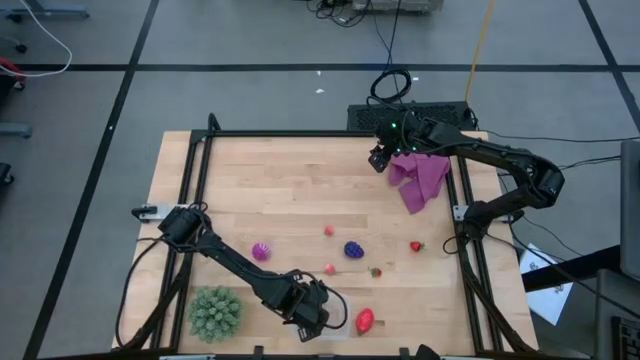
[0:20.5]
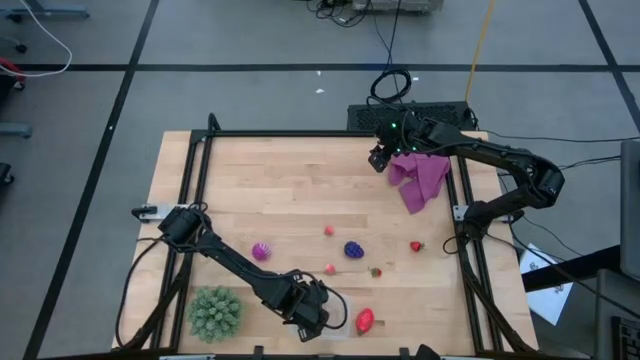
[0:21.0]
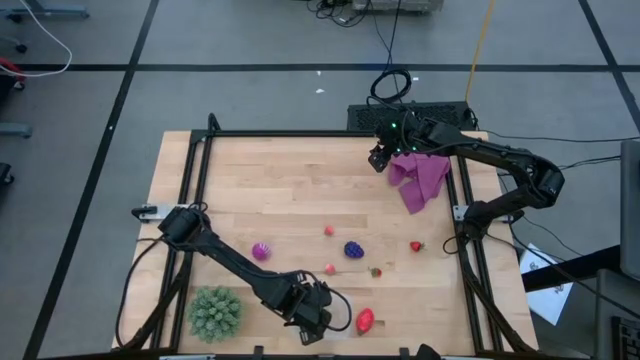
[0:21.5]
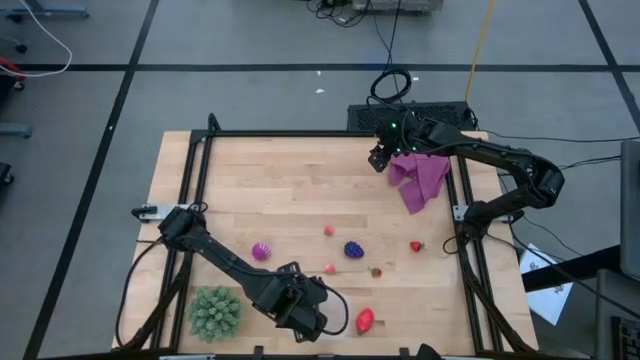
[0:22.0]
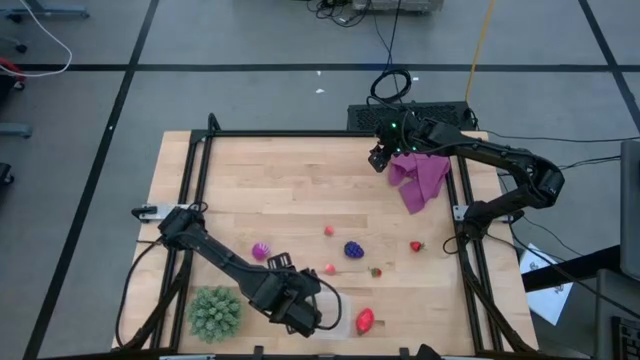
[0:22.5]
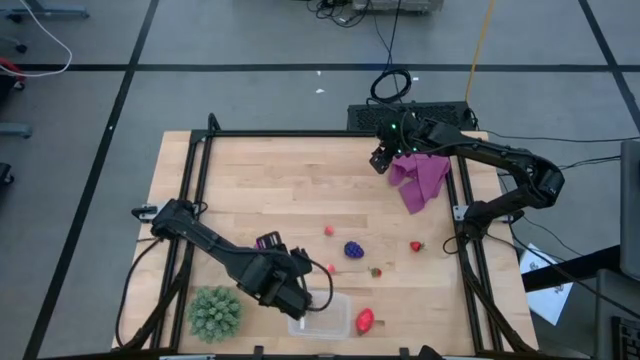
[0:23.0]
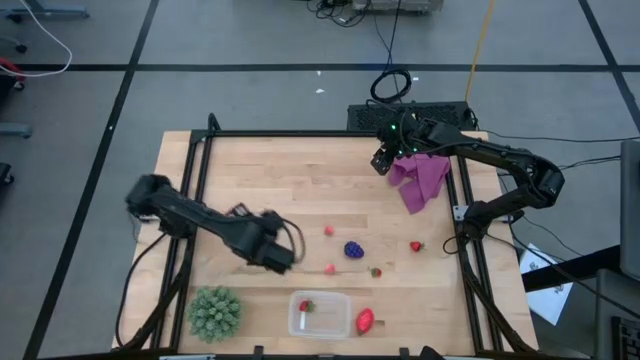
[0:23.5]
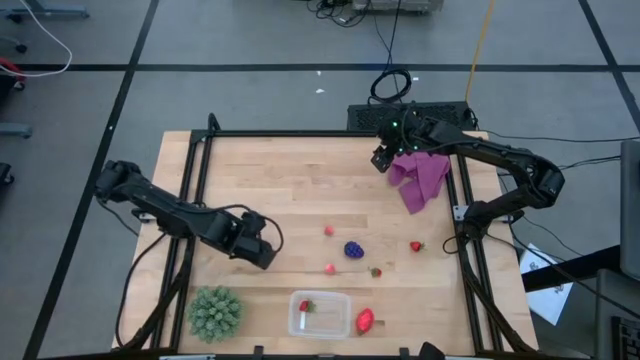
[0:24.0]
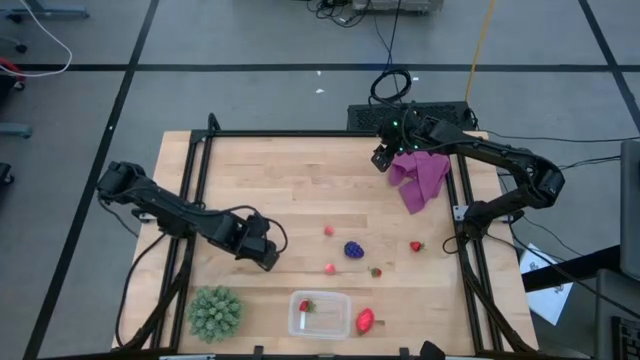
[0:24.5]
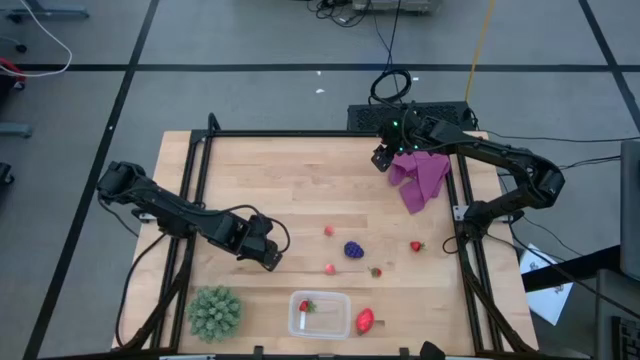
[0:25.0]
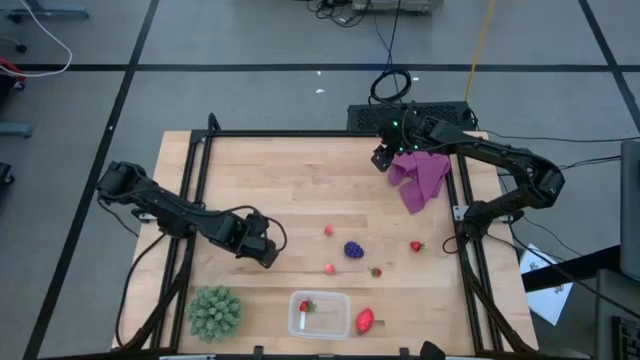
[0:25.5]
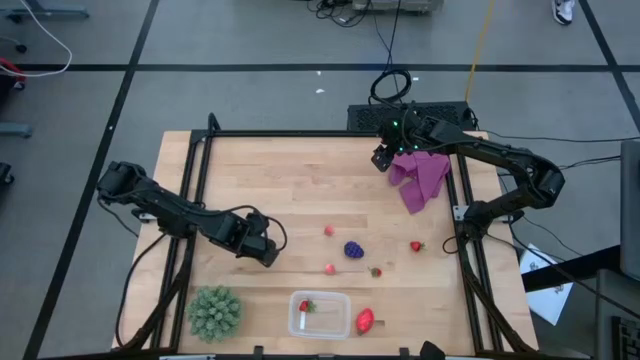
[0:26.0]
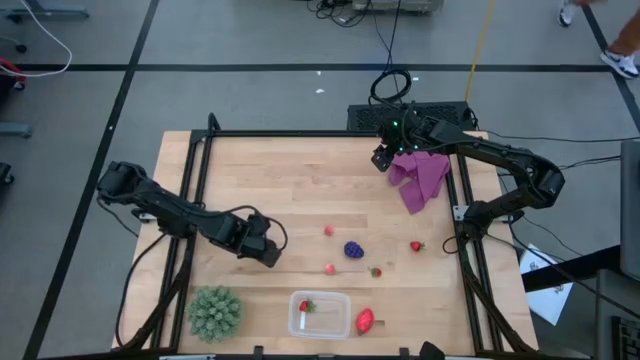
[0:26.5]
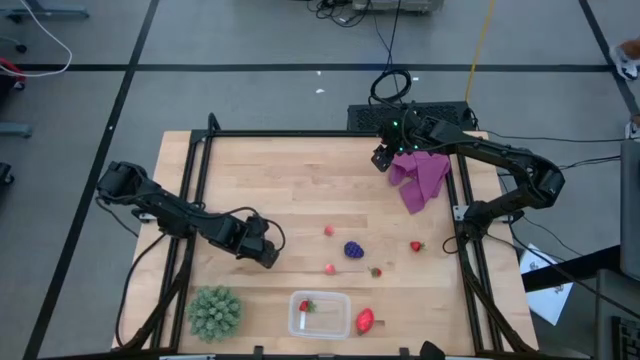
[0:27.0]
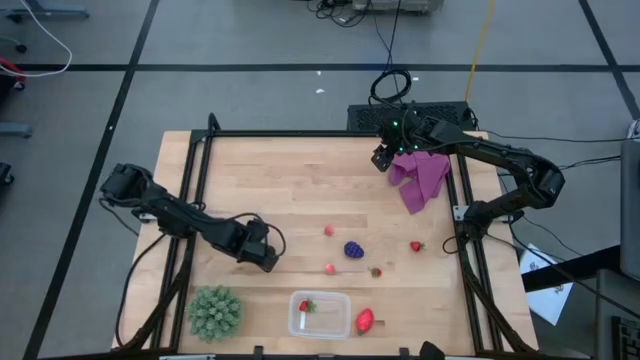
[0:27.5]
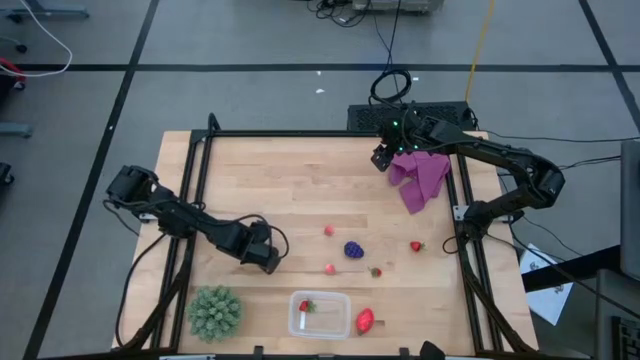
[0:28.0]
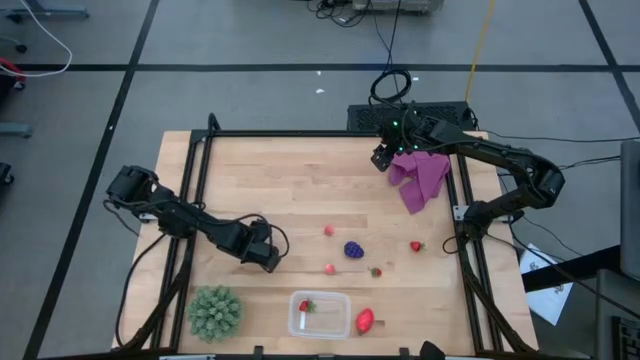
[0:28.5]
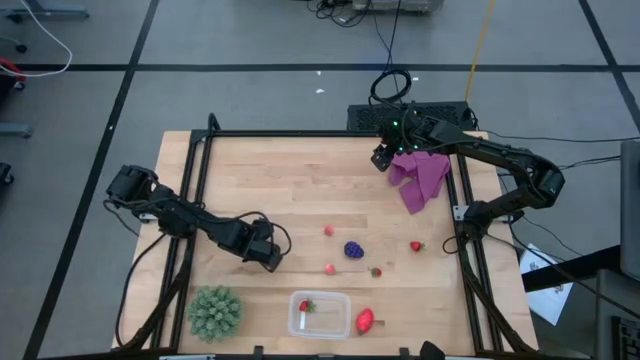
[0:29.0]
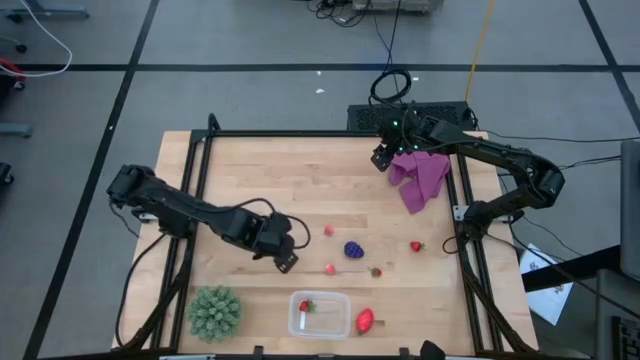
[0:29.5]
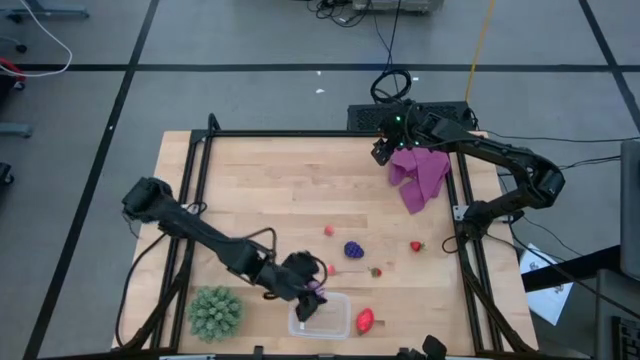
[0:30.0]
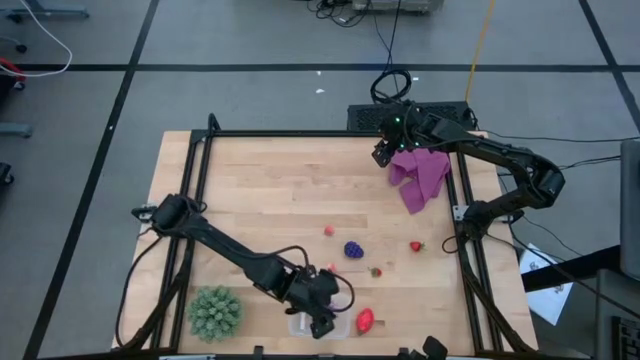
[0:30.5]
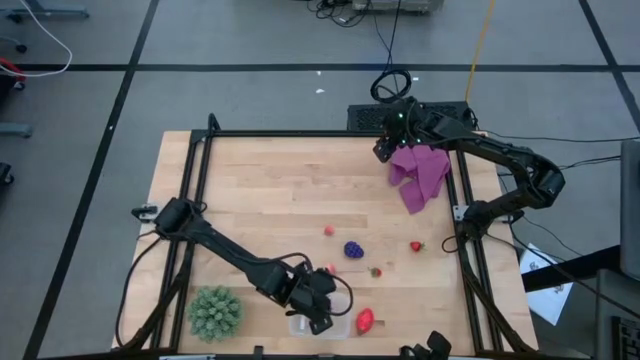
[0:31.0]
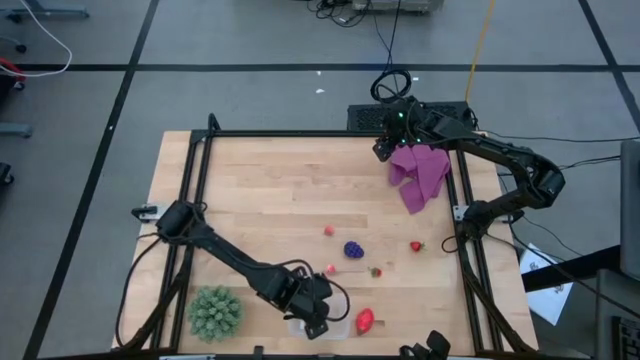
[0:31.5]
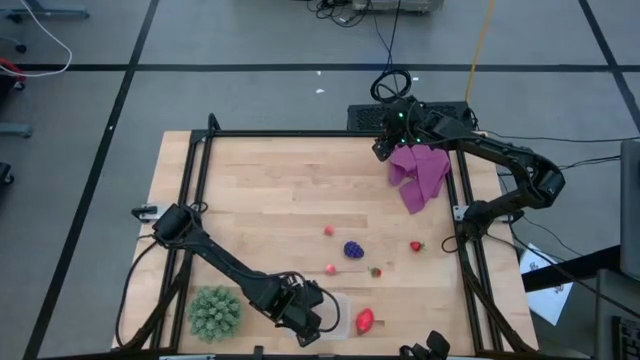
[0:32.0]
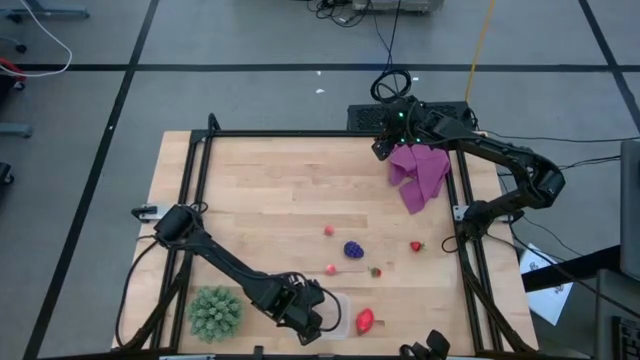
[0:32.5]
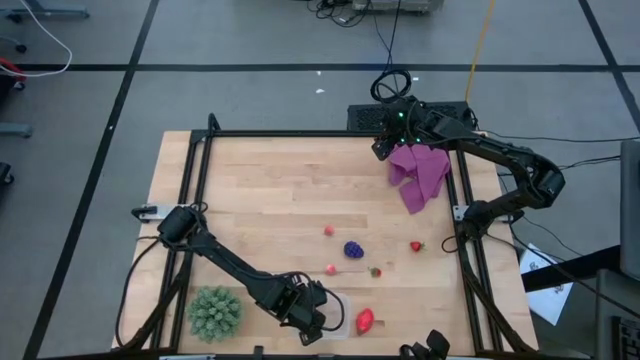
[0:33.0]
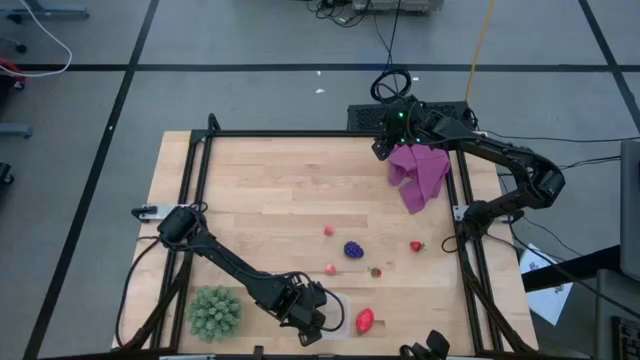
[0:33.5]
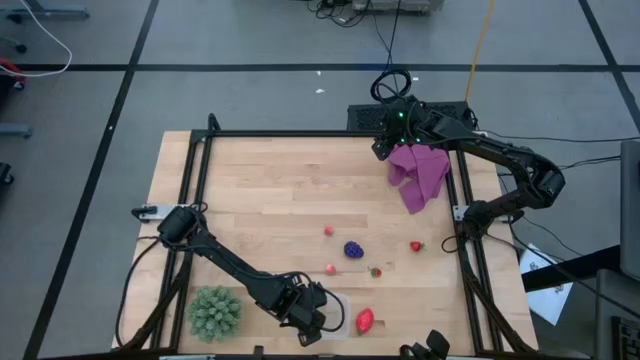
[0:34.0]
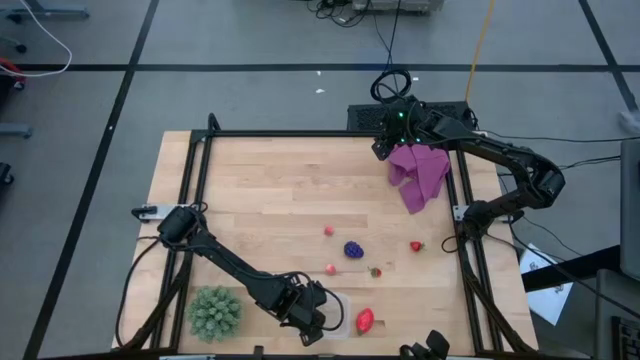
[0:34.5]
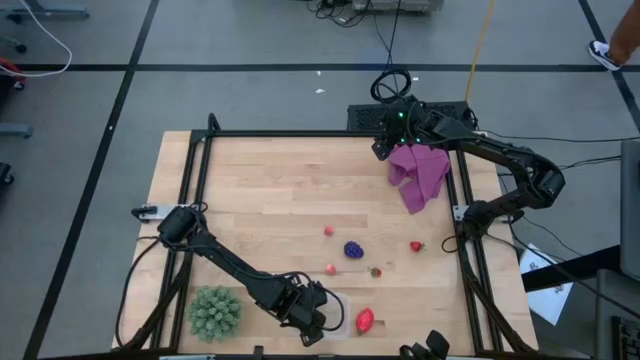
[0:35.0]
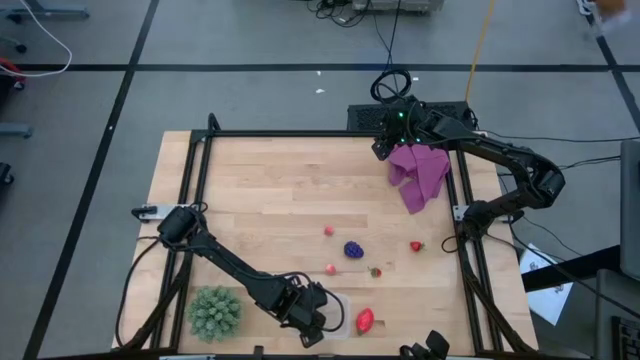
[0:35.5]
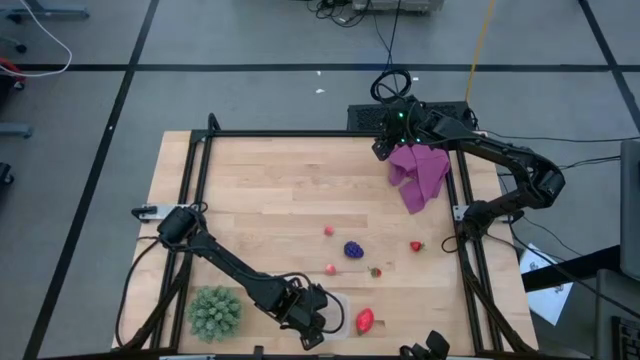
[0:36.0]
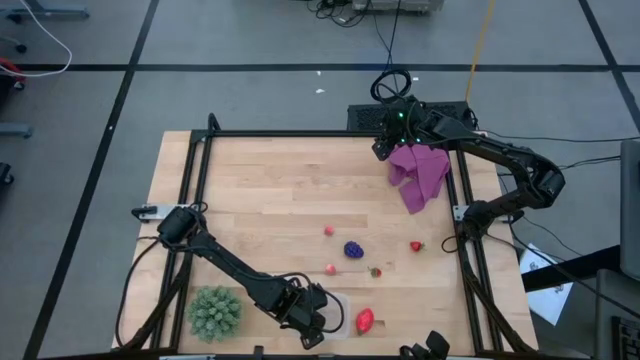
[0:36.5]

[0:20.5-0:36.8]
Task: Pick and placing Produce into tupperware
Put the onion into the transparent bin

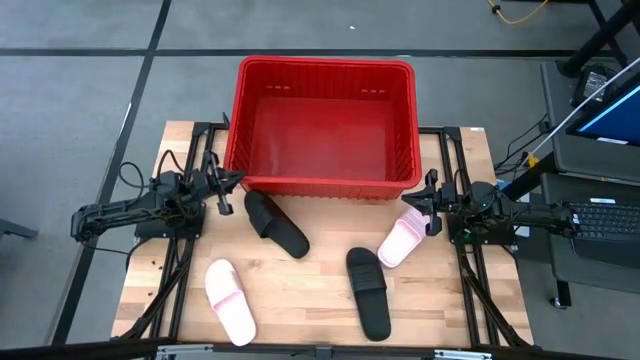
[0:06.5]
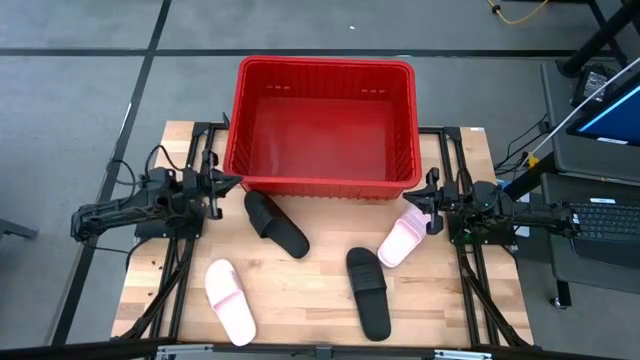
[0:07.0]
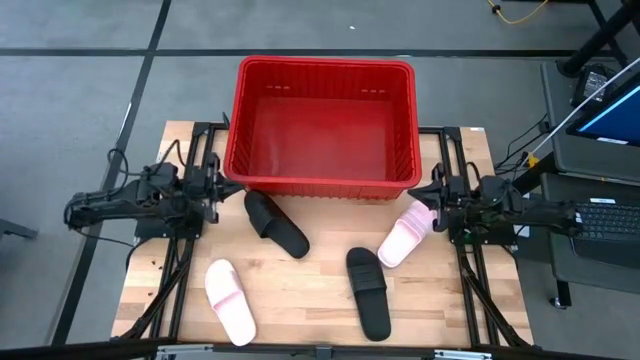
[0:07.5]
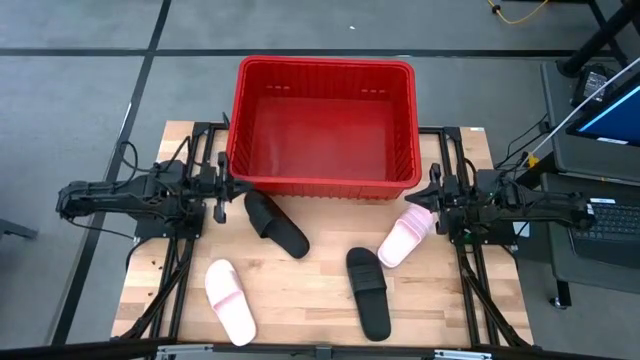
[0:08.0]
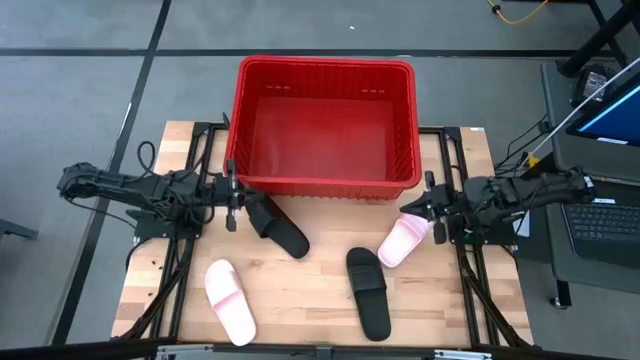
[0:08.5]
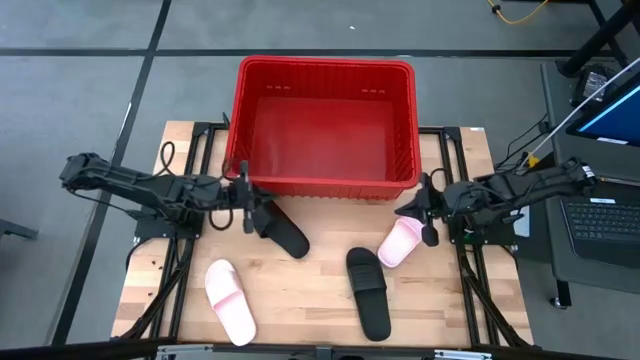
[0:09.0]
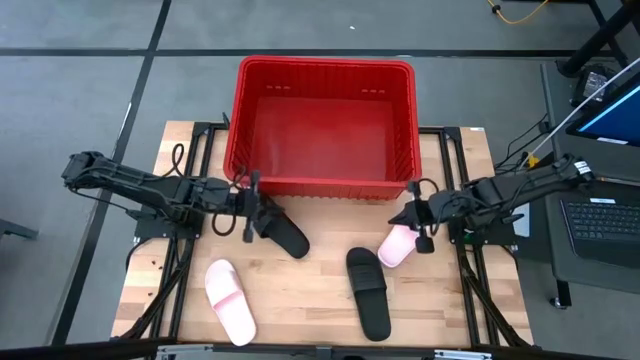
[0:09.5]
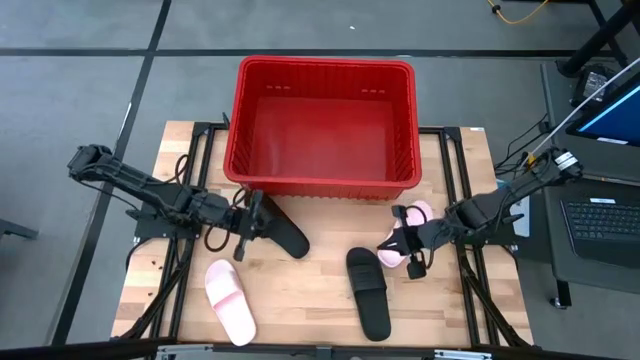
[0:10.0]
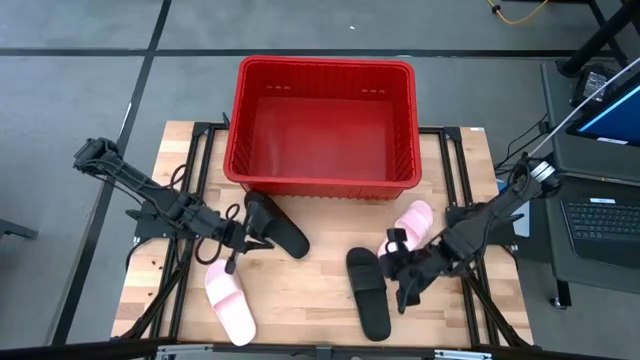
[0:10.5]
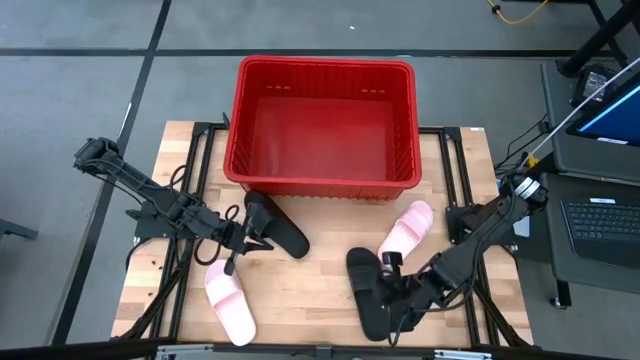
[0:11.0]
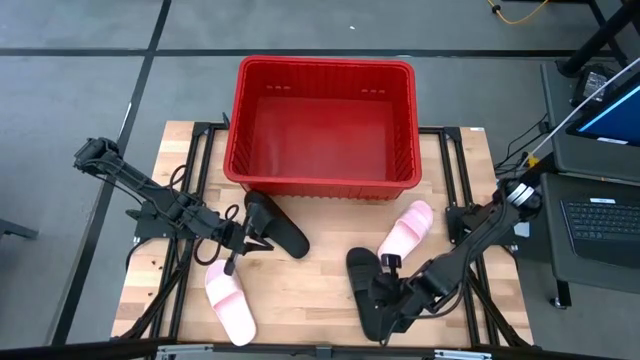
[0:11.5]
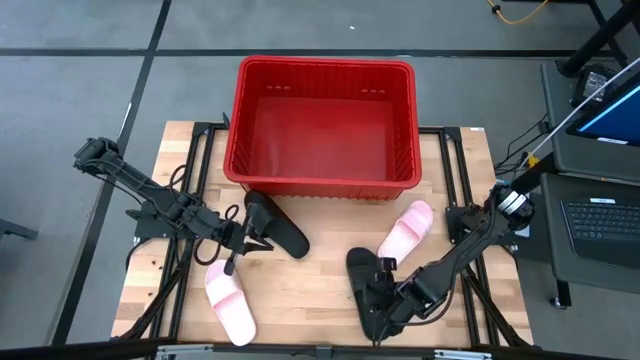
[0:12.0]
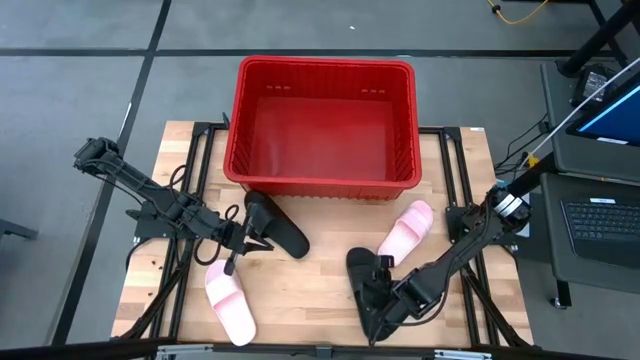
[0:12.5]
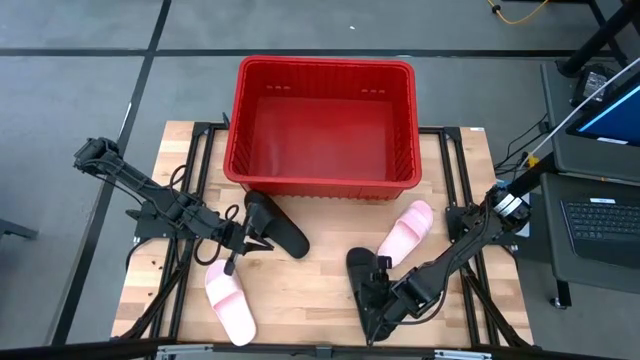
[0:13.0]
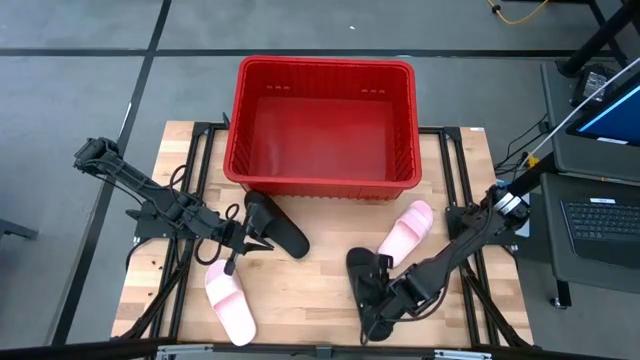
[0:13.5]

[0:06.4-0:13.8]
Task: Pick and place slides into bin
Put the right black slide into the red bin
